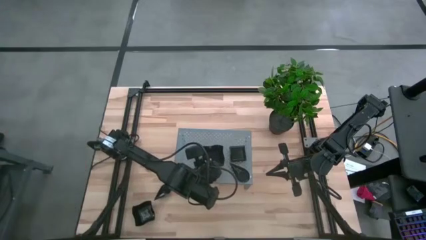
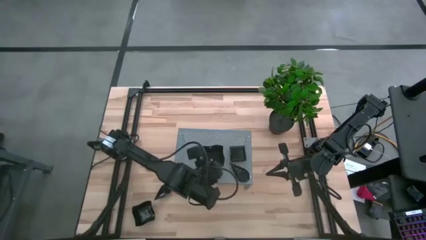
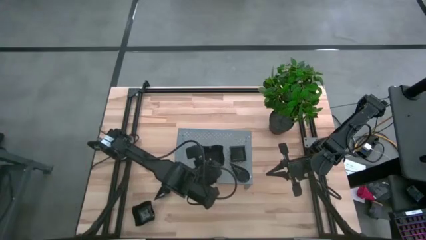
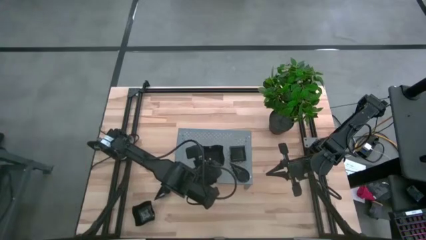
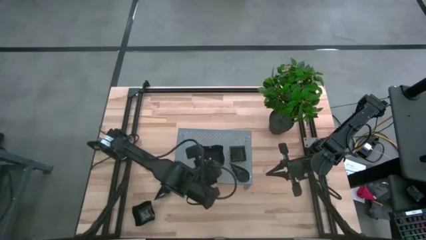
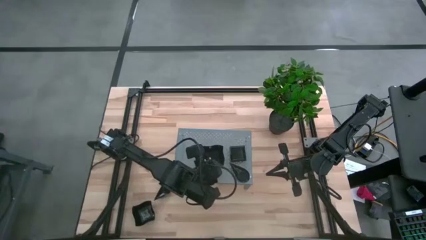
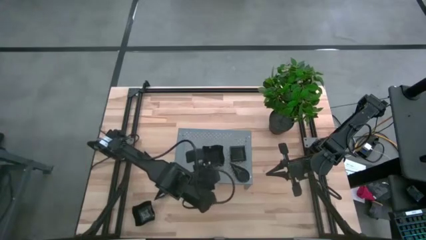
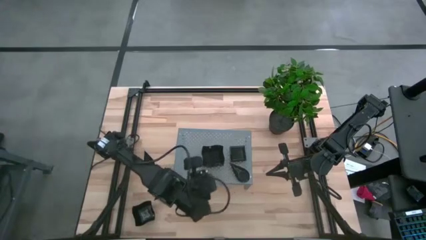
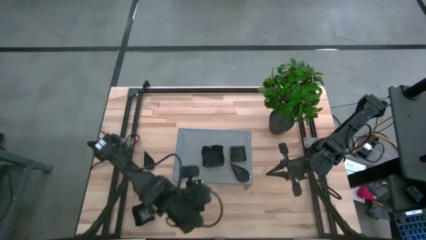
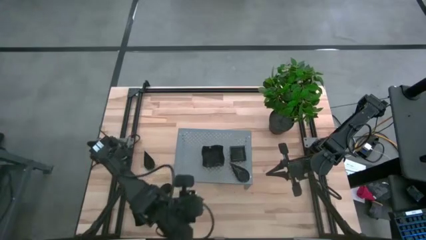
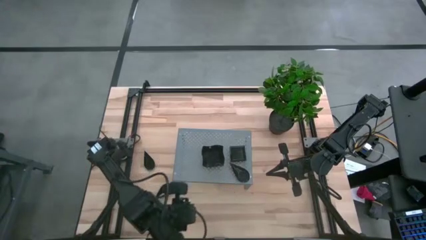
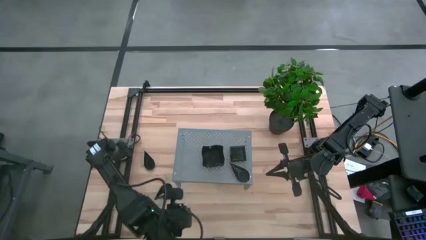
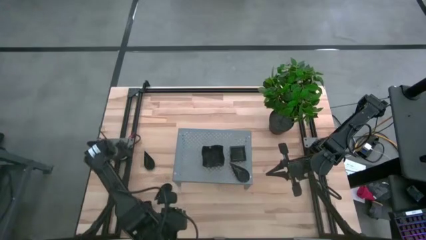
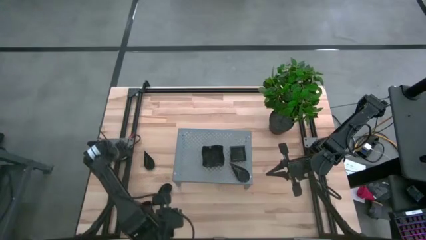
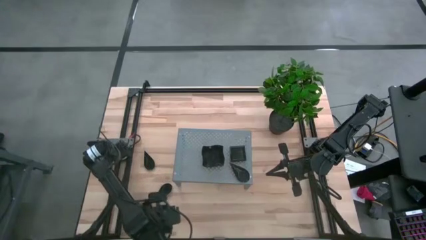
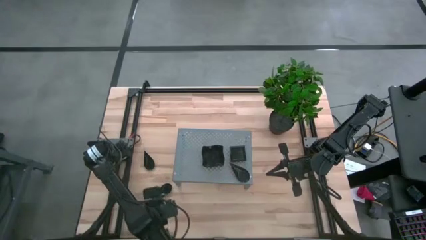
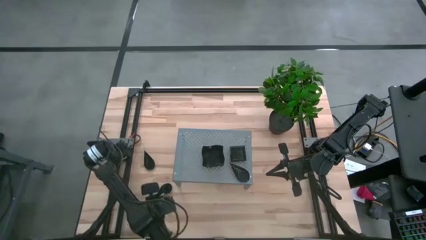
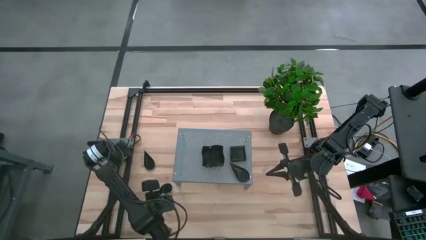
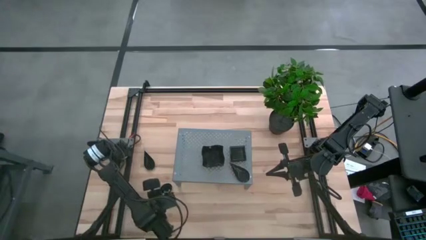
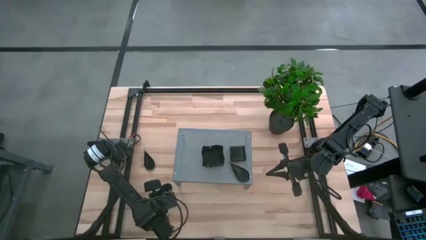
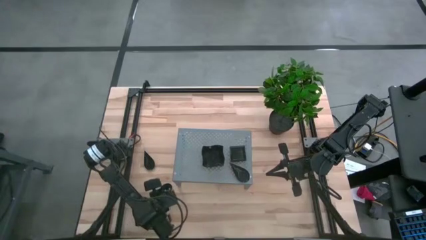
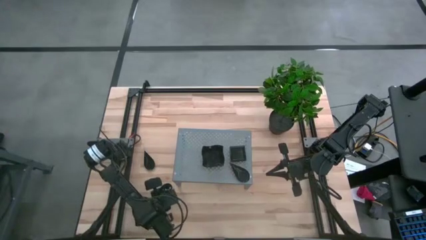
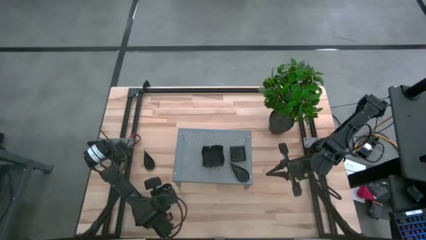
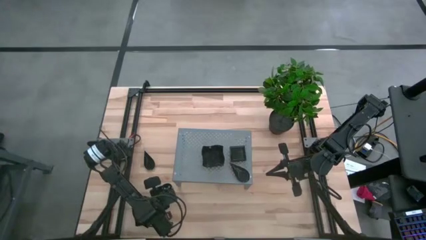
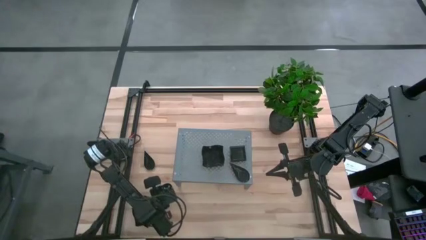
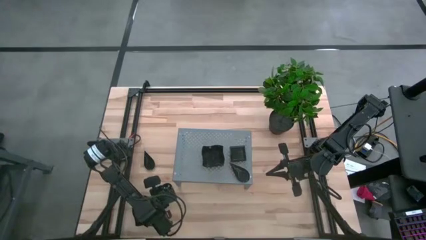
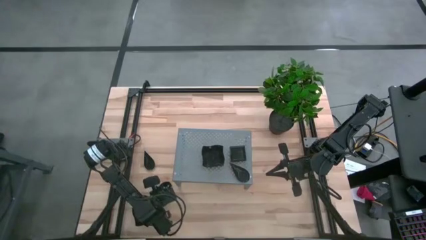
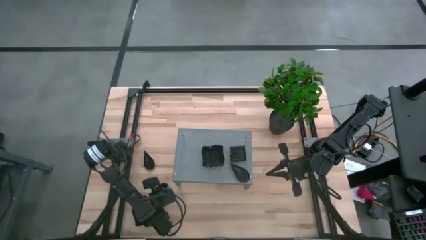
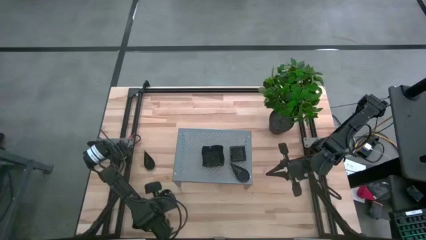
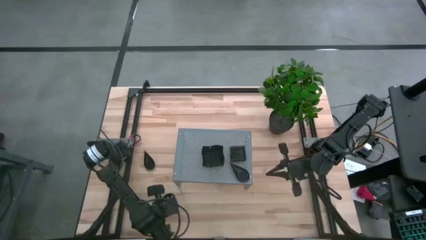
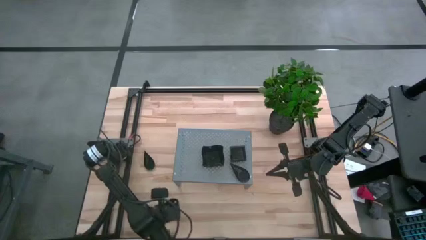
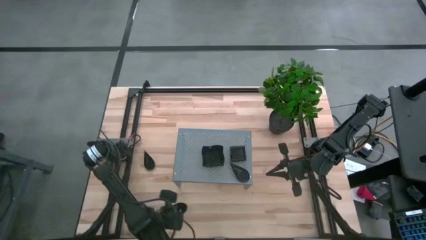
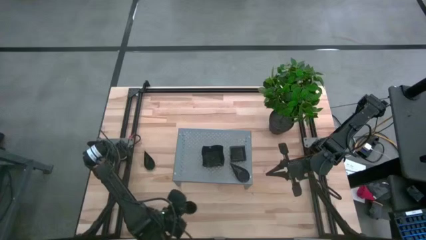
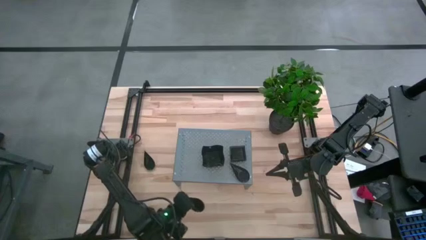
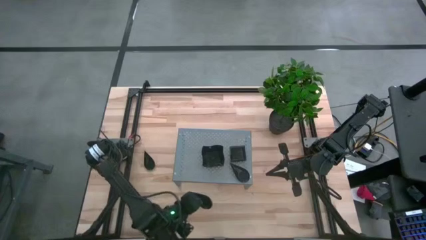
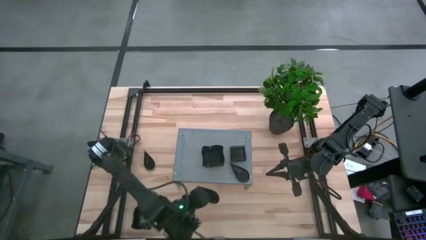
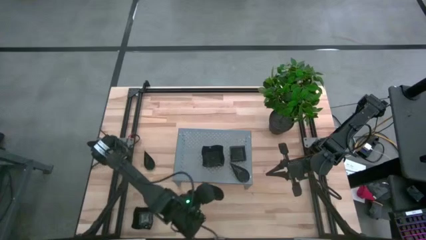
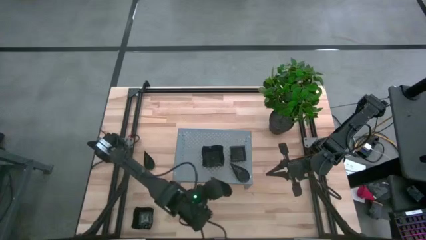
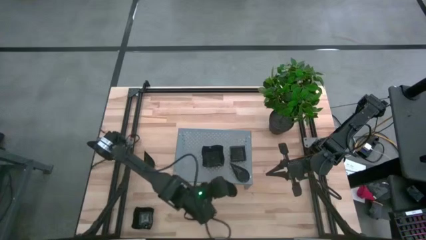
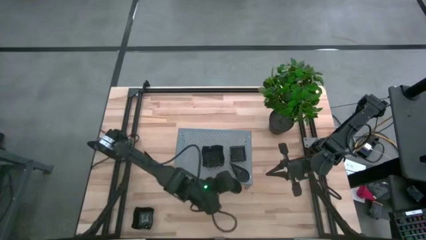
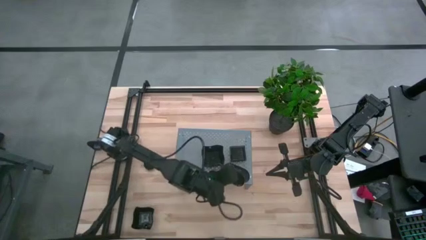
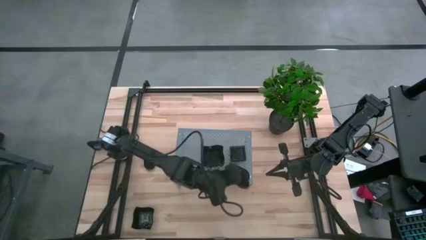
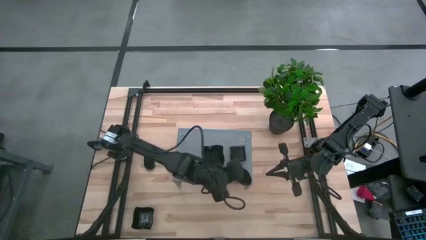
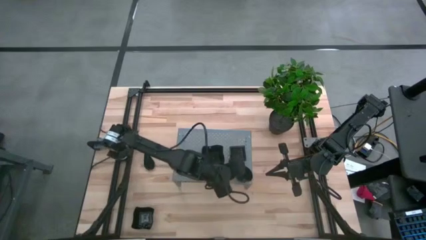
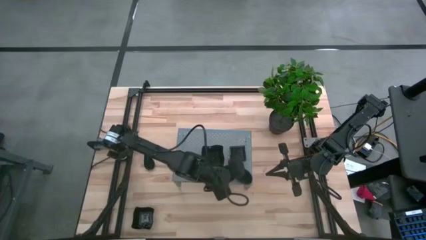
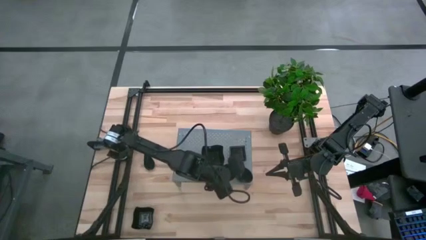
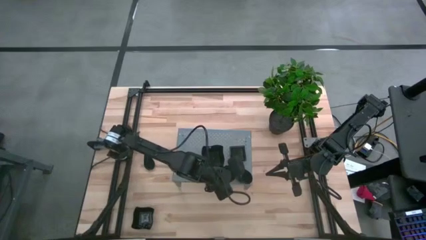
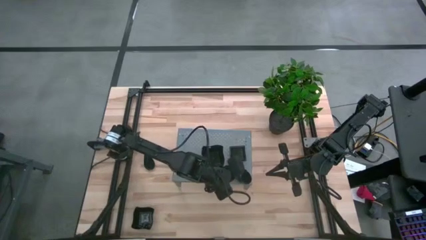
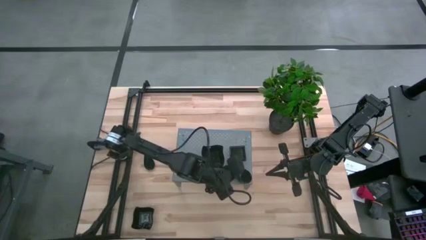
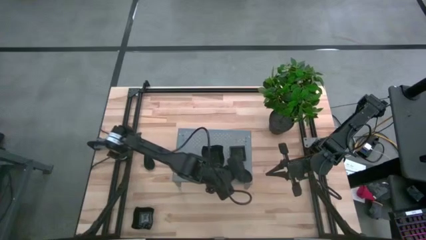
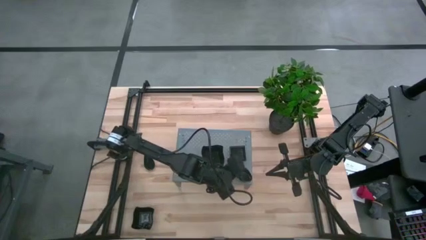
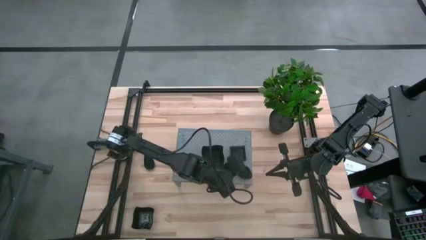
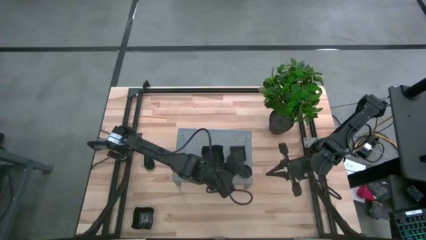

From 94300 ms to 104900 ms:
Task: Pick & Place Mini shaped plates
Stack the bottom left drop-shaped plate on the drop-shaped plates on the shelf

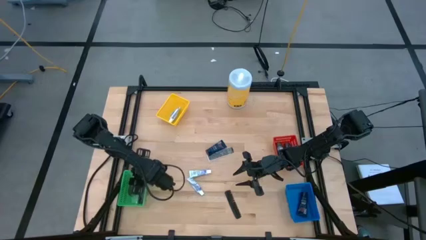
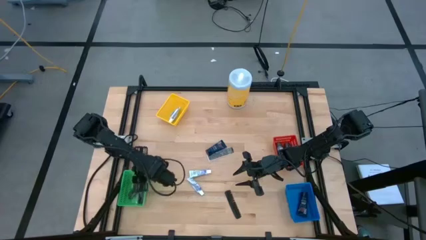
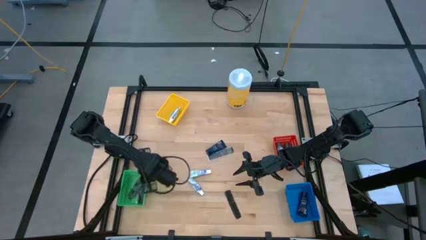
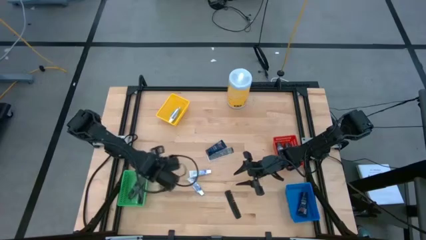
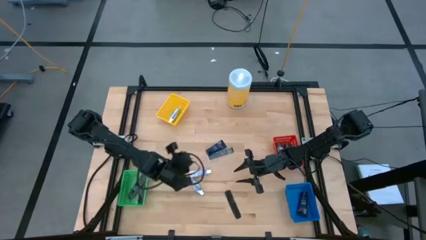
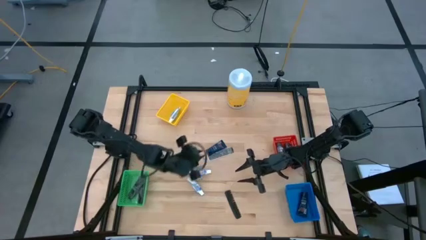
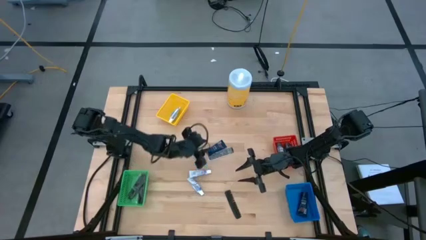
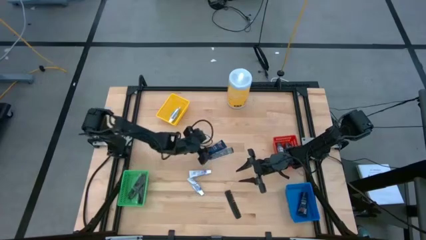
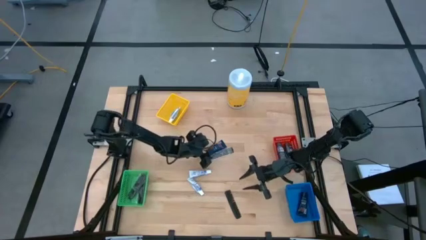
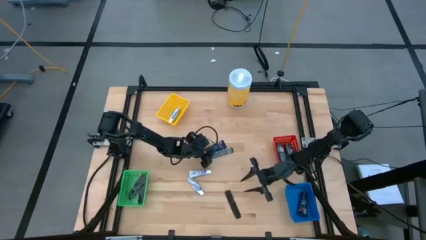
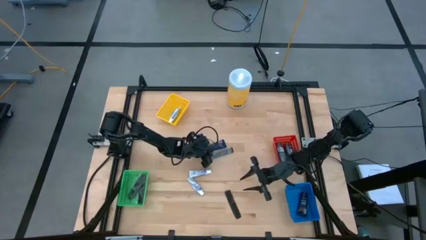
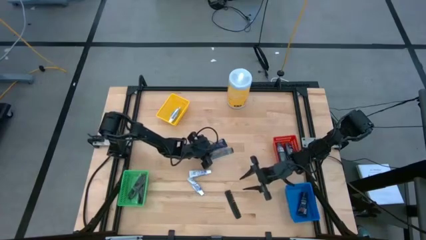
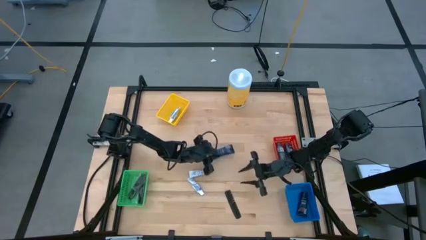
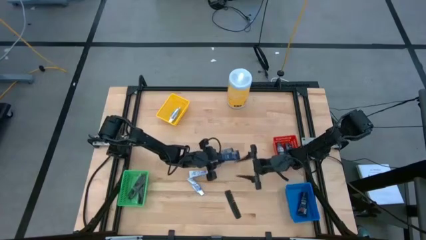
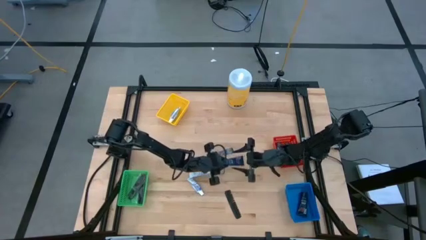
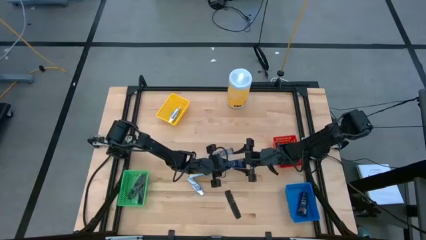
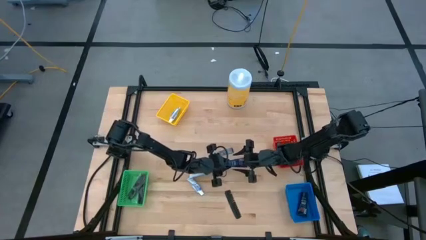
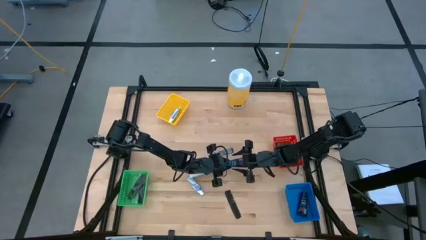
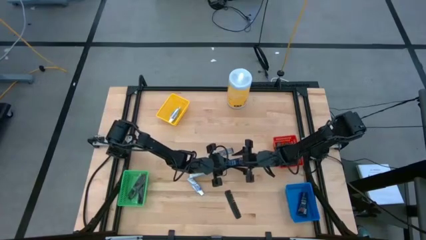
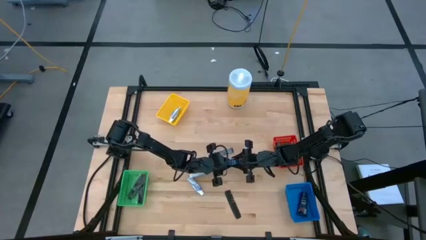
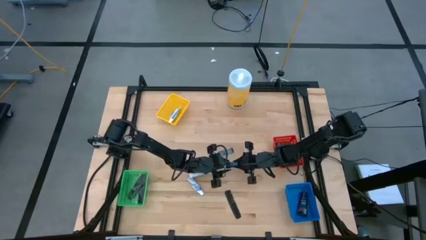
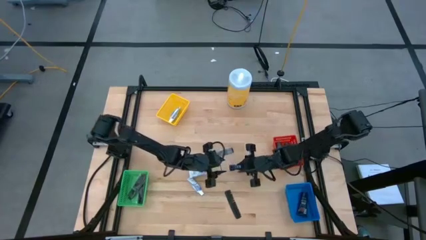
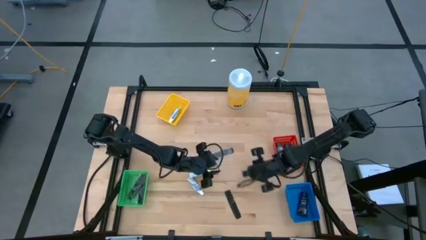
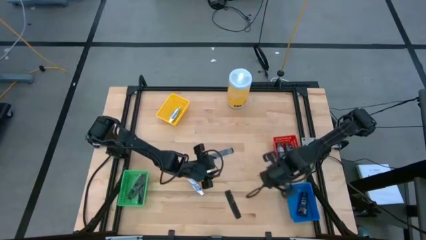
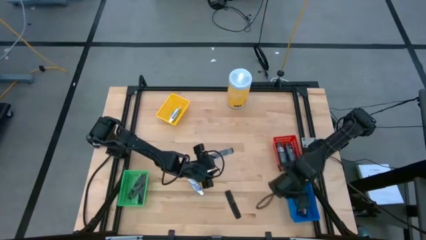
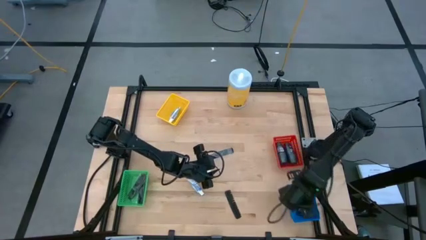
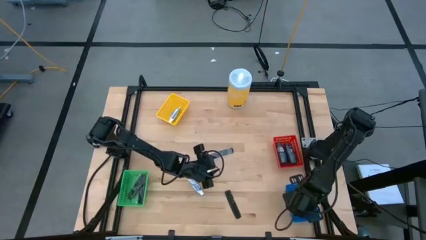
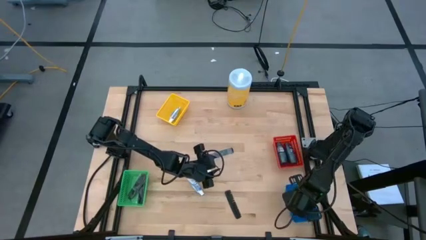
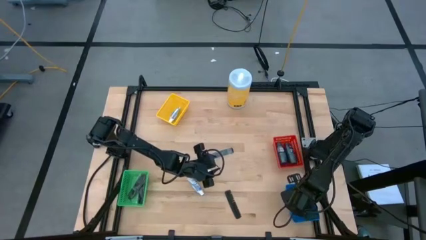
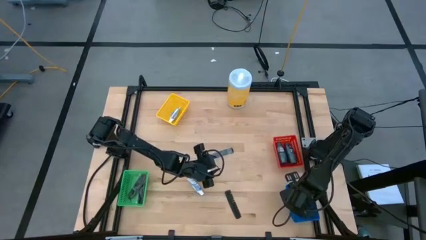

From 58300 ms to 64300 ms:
Task: Pick & Place Travel size toiletries
Put the blue shave cream into the blue bin
